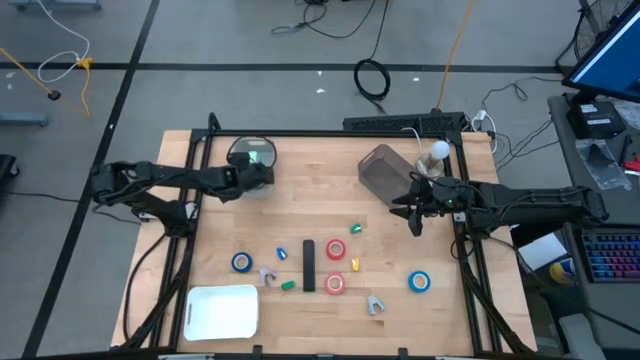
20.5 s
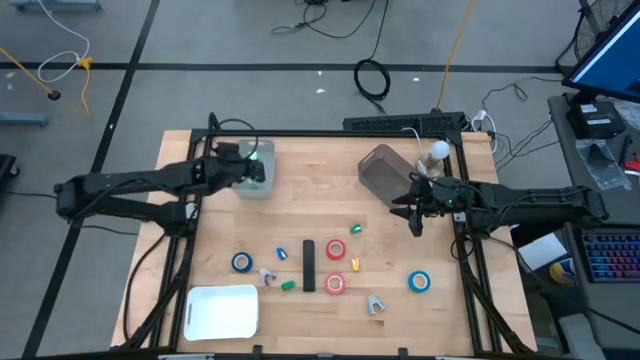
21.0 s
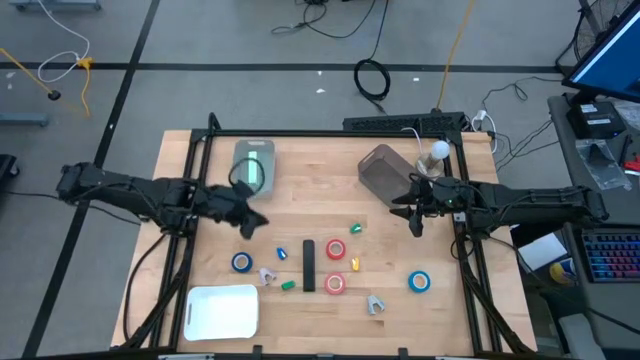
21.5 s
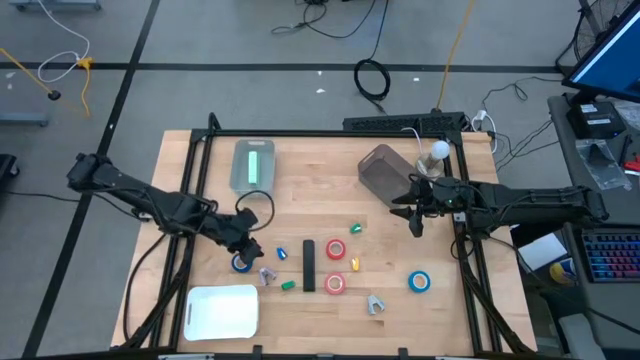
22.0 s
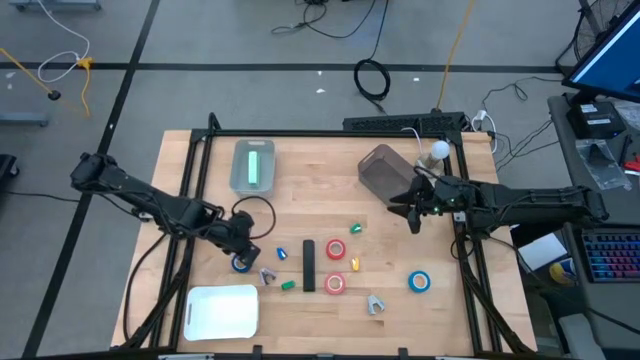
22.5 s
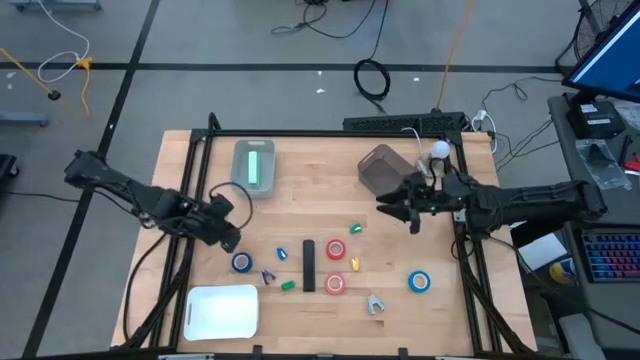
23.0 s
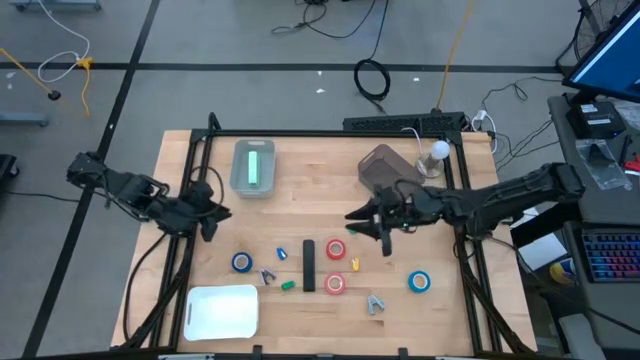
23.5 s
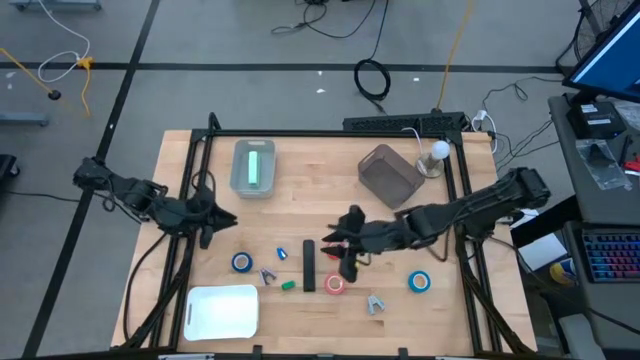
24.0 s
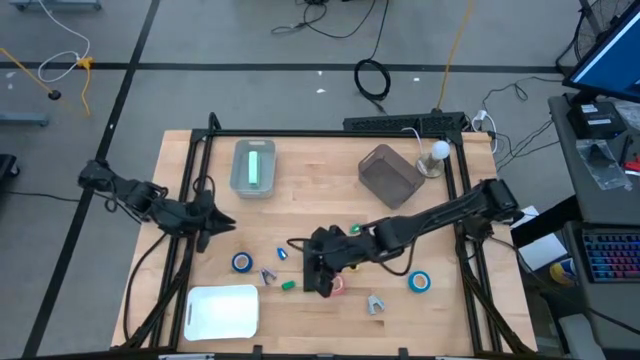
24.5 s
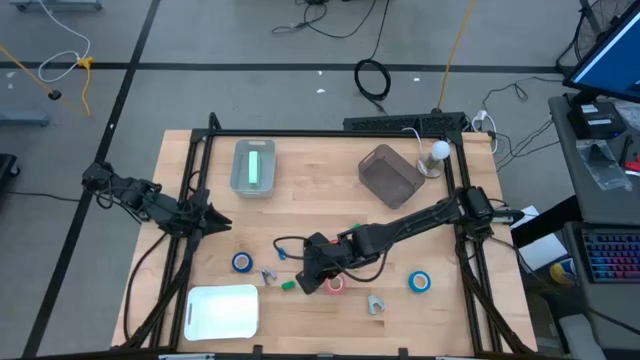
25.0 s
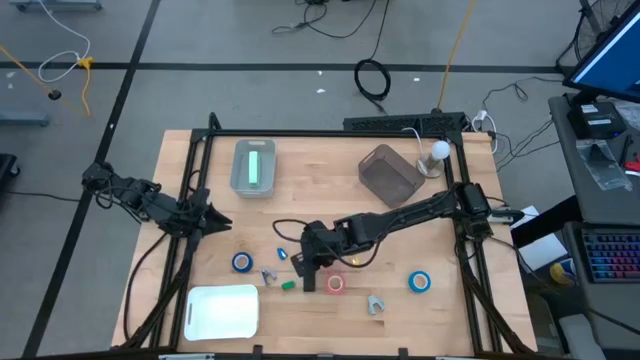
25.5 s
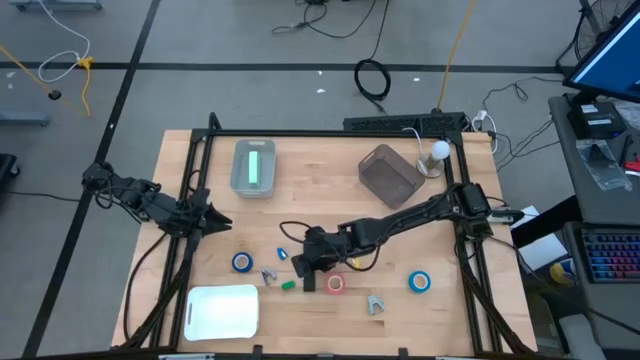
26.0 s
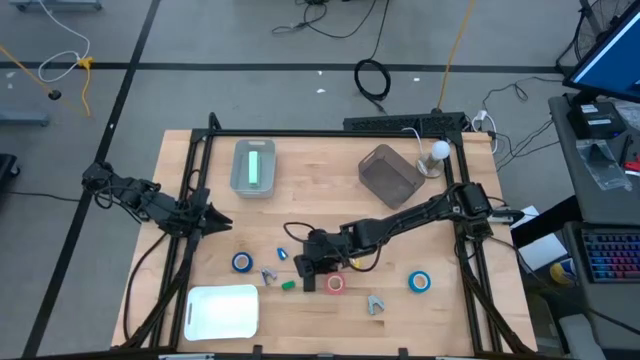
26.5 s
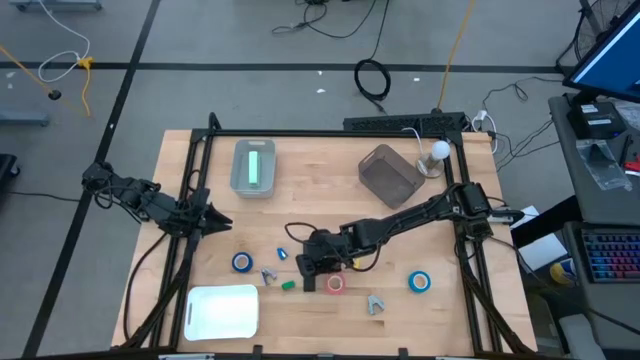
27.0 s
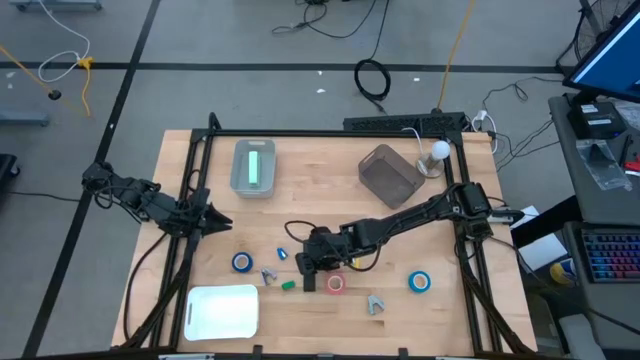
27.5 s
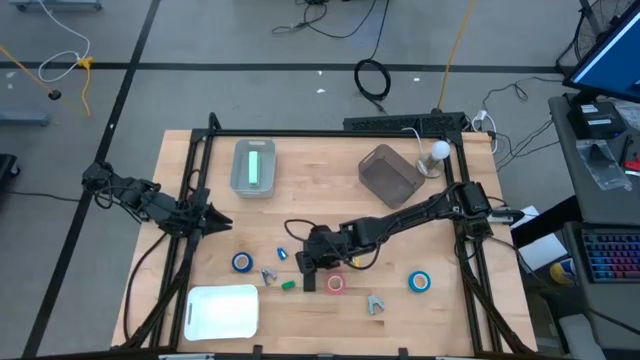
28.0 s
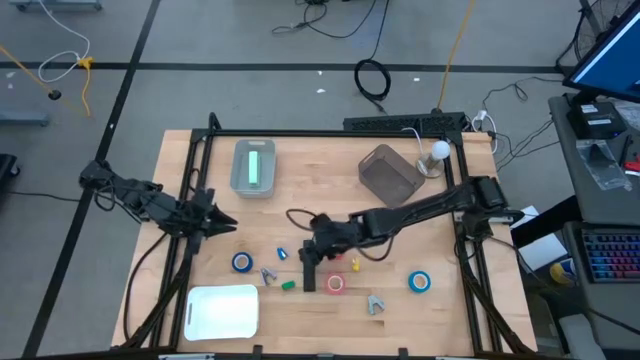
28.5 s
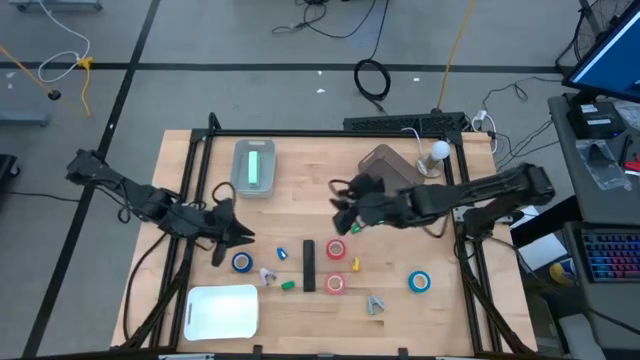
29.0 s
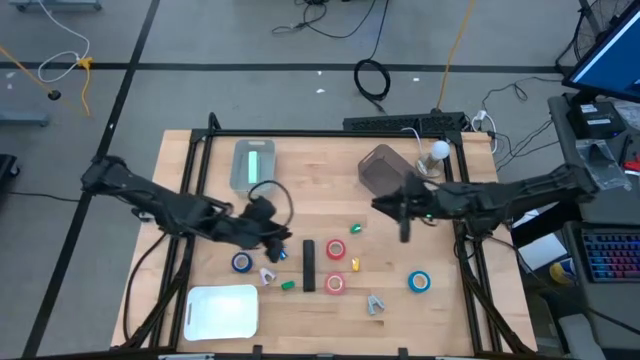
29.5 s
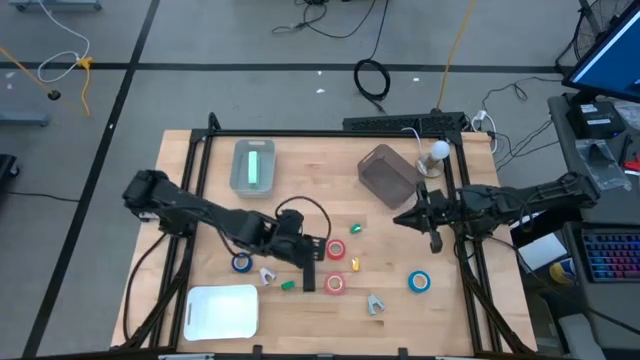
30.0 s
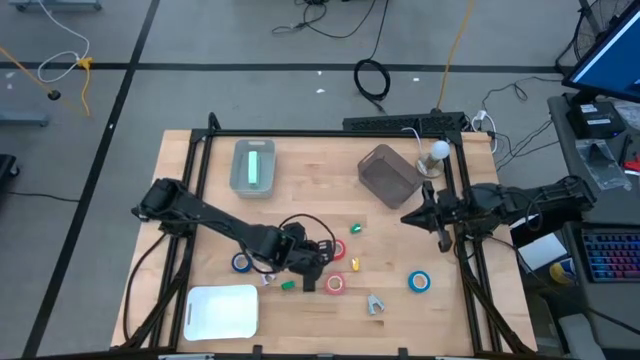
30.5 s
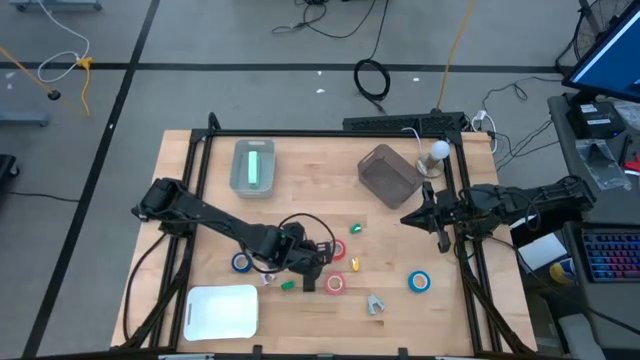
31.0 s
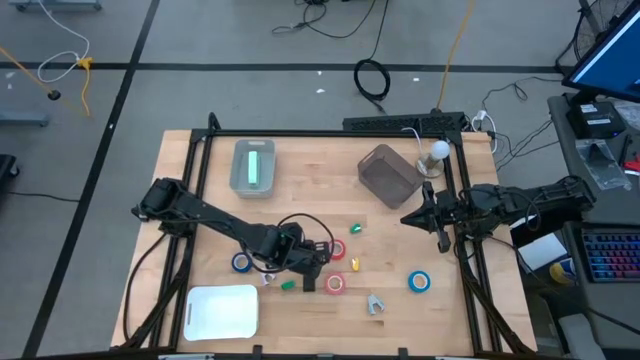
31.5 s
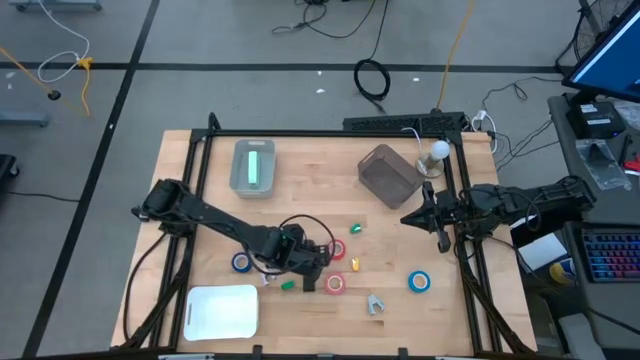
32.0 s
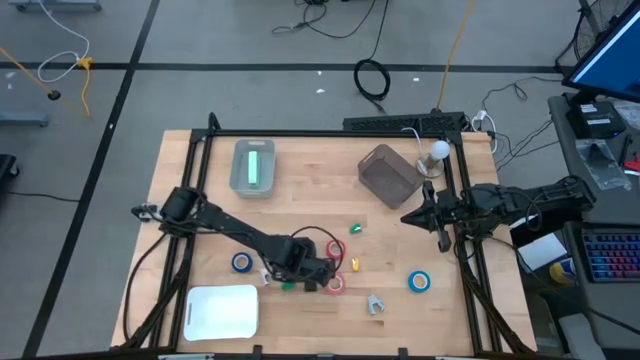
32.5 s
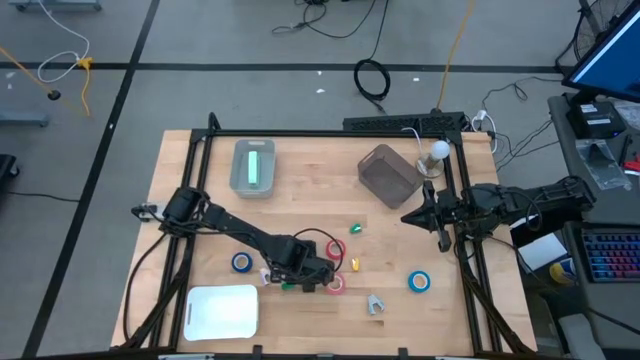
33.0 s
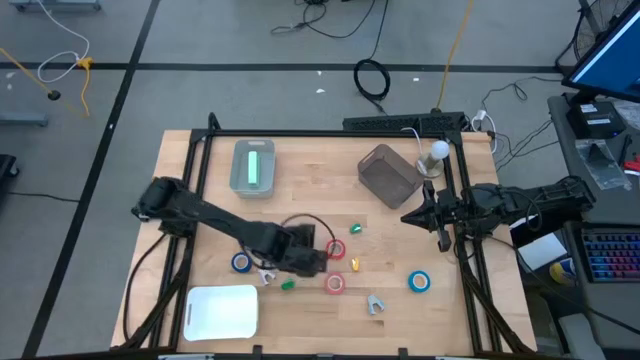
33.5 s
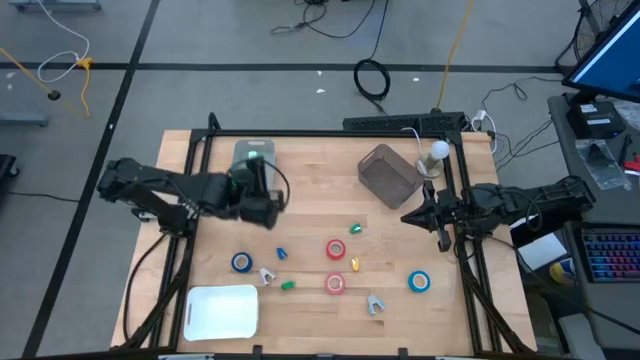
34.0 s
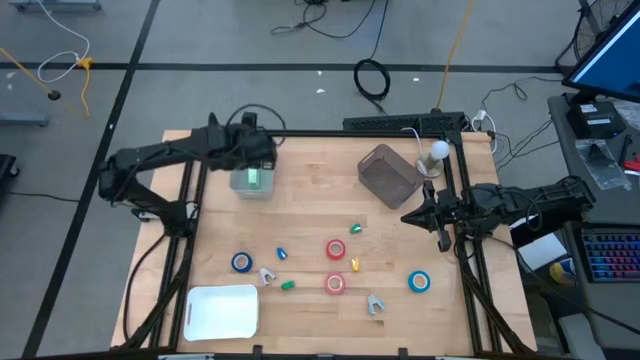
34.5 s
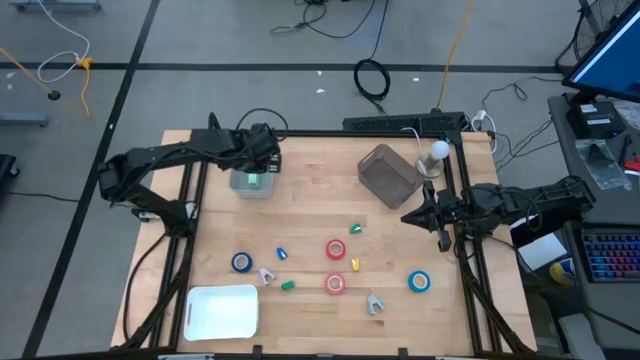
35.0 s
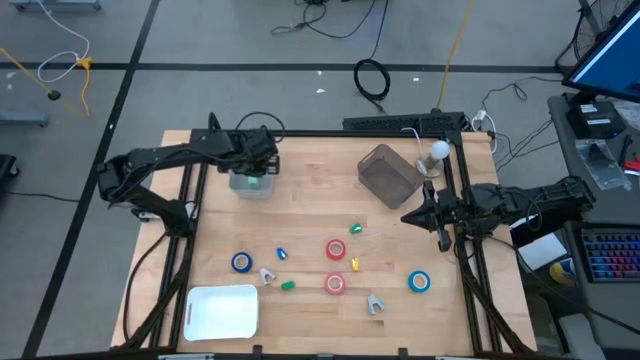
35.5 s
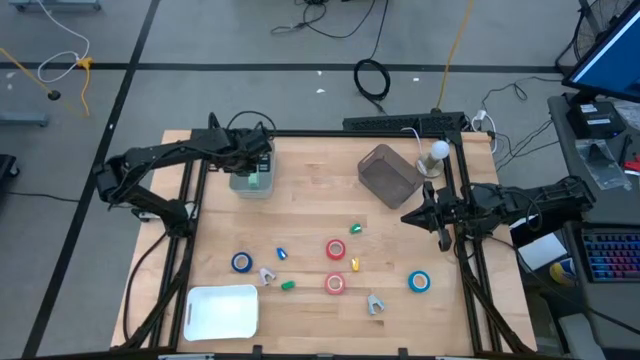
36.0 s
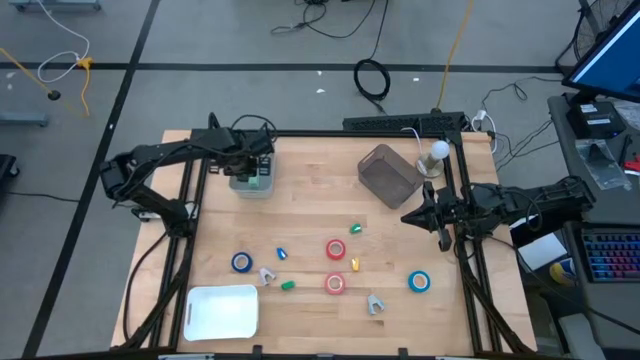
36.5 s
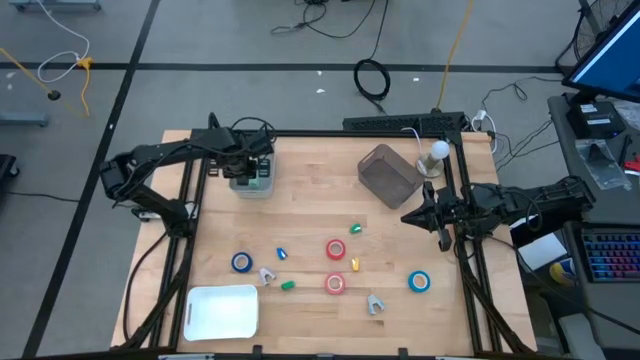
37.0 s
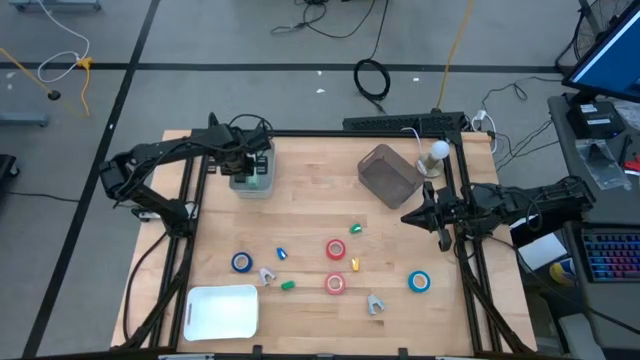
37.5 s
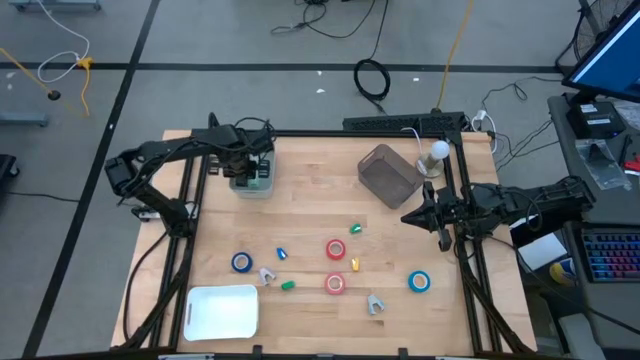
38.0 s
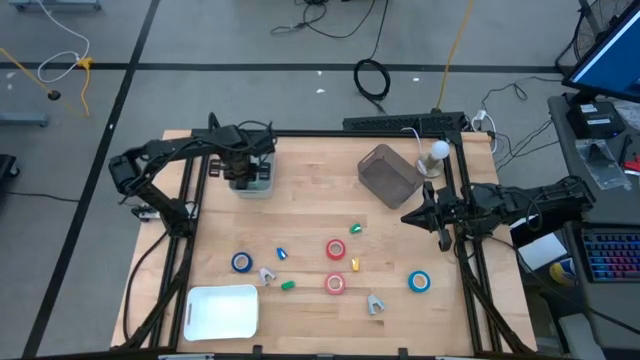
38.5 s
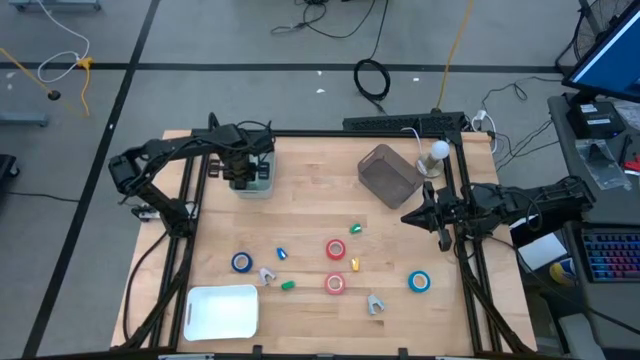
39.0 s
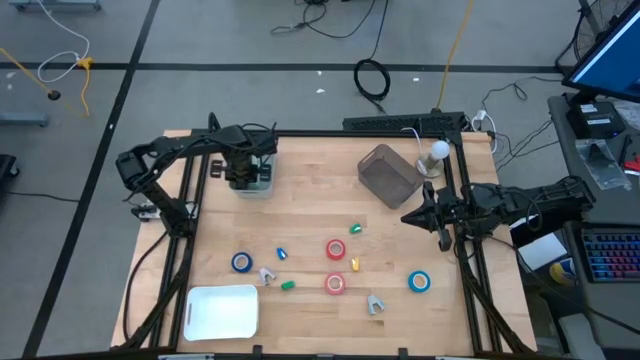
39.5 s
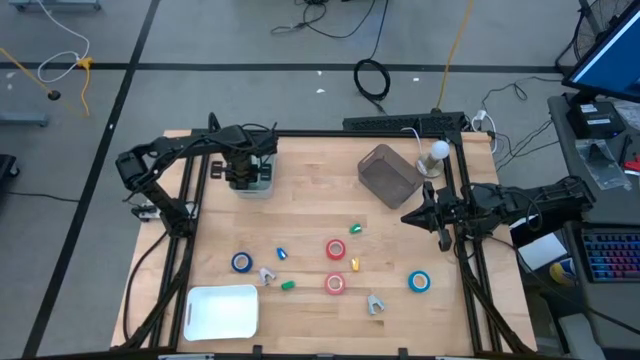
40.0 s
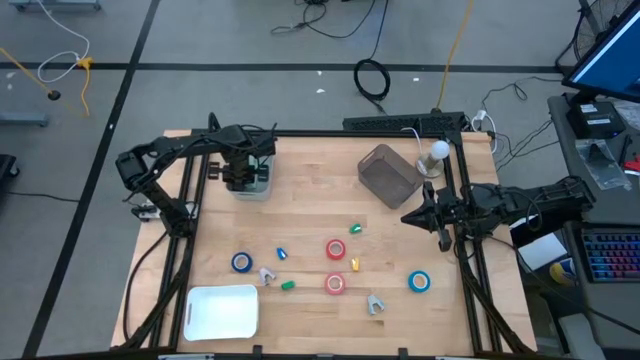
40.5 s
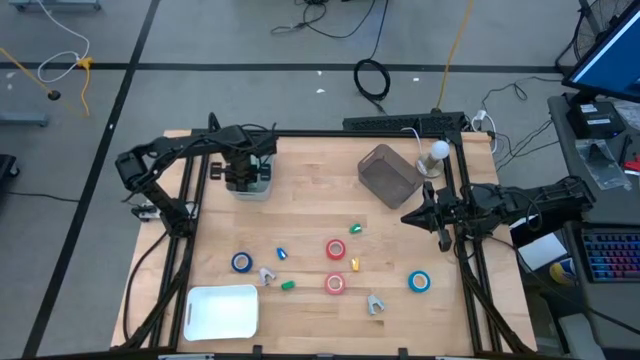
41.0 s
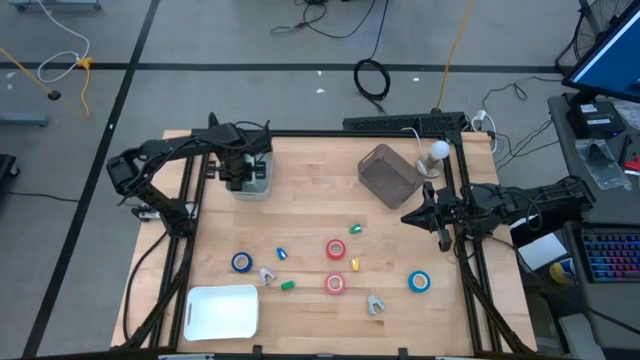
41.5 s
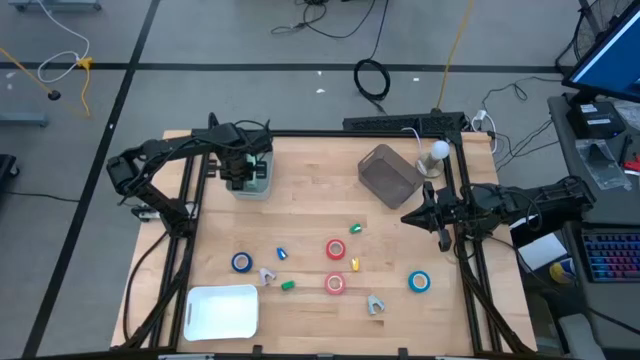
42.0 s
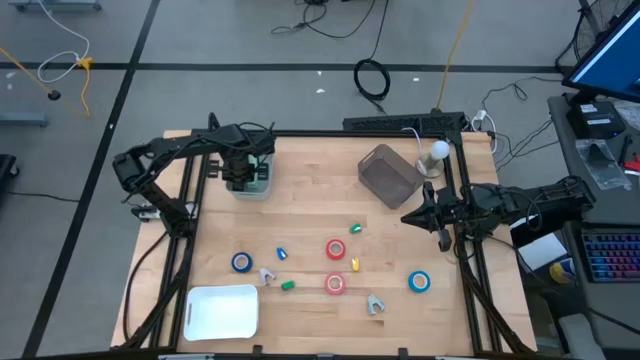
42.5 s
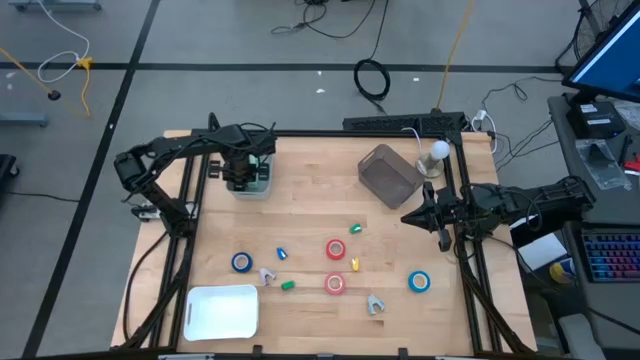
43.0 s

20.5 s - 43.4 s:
Task: Pick and place Stapler, Stapler remover, tape
Put the black stapler into the gray bin
